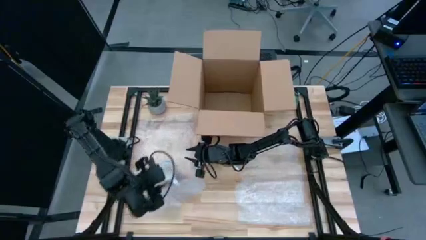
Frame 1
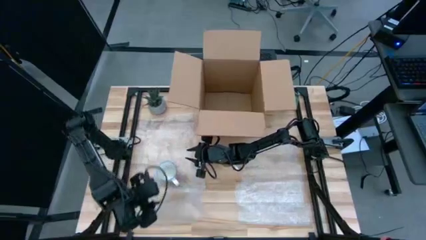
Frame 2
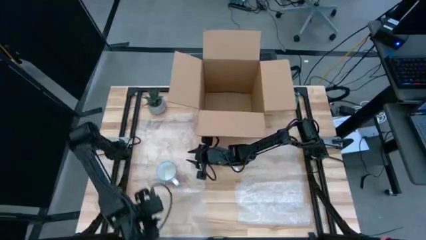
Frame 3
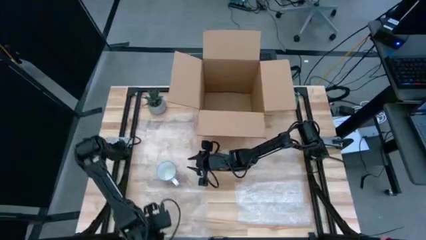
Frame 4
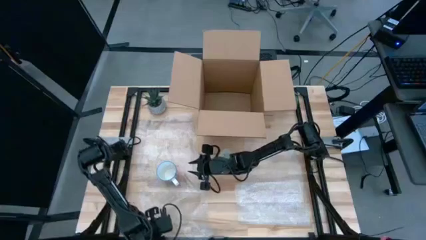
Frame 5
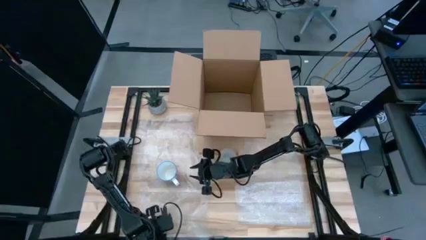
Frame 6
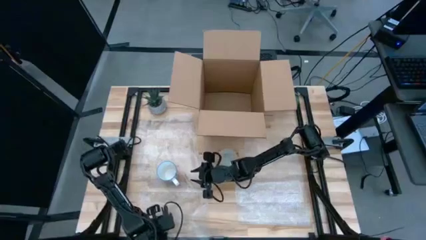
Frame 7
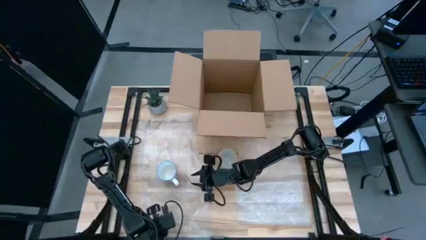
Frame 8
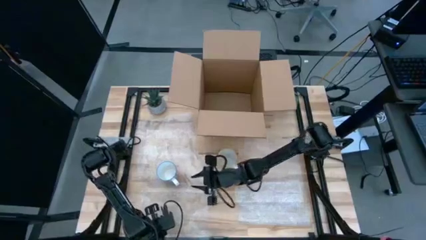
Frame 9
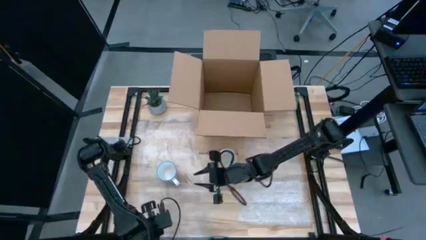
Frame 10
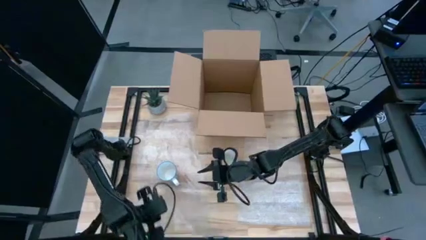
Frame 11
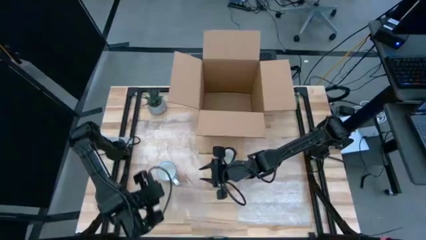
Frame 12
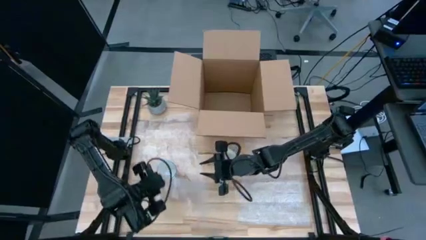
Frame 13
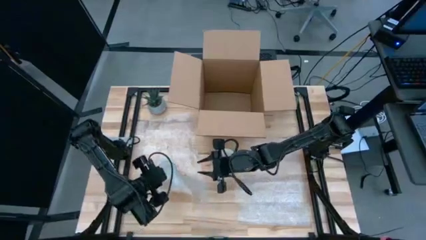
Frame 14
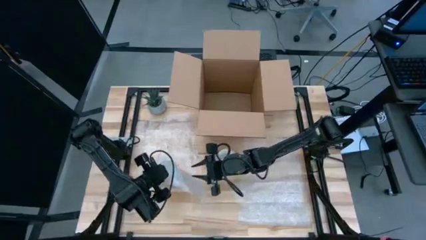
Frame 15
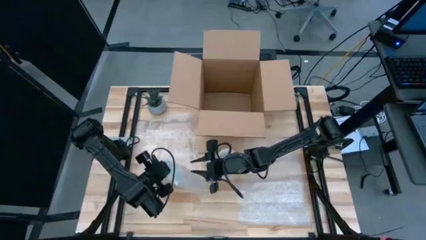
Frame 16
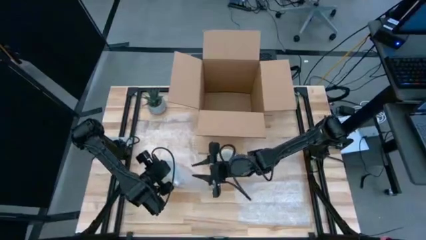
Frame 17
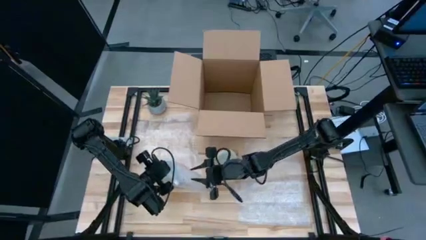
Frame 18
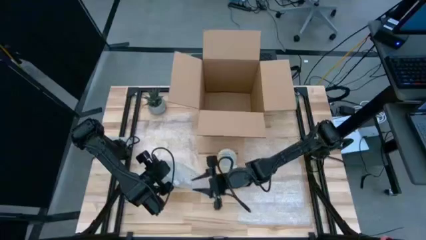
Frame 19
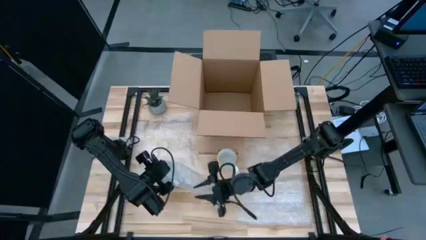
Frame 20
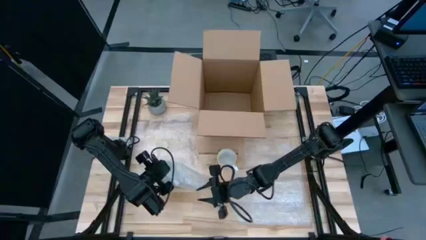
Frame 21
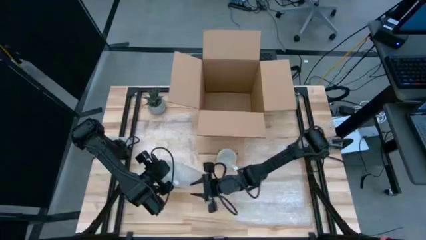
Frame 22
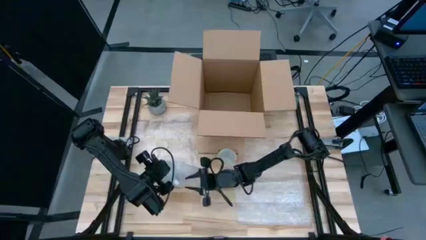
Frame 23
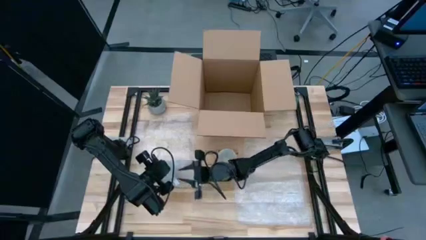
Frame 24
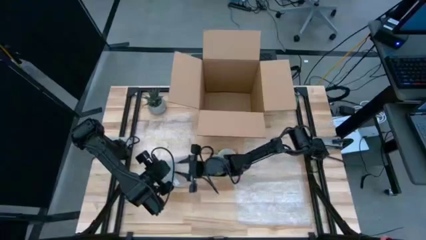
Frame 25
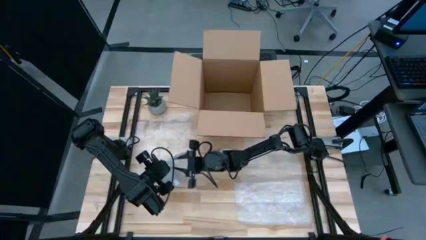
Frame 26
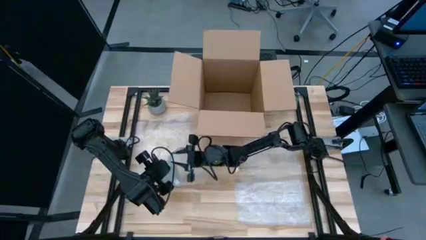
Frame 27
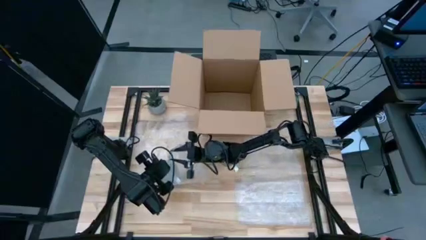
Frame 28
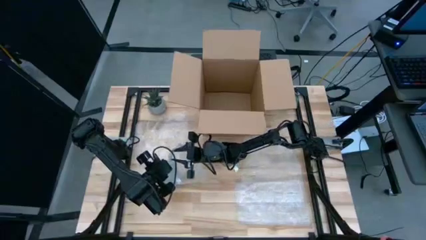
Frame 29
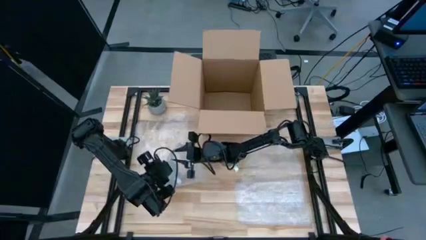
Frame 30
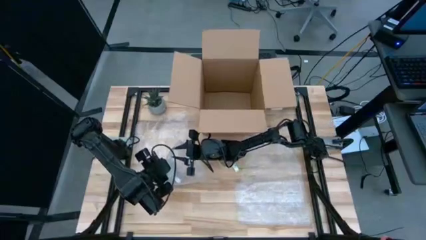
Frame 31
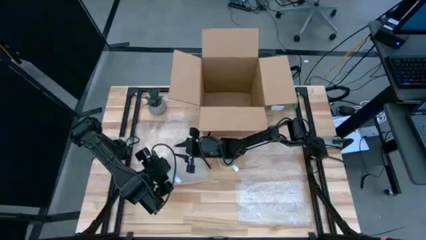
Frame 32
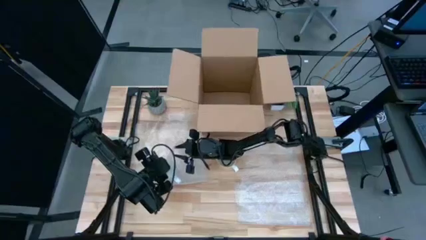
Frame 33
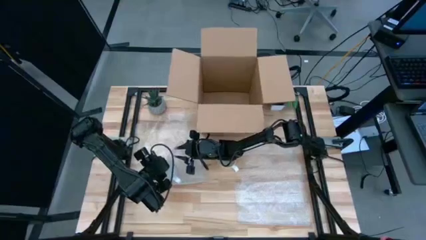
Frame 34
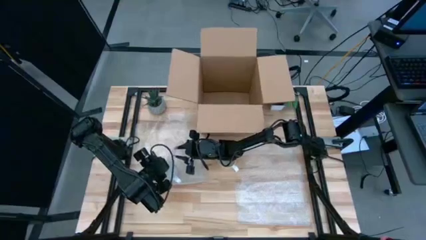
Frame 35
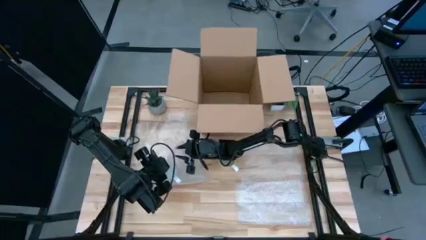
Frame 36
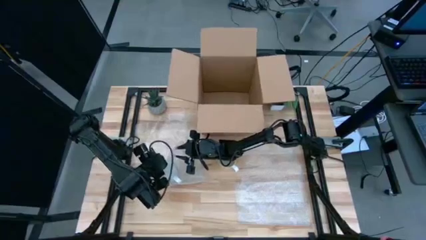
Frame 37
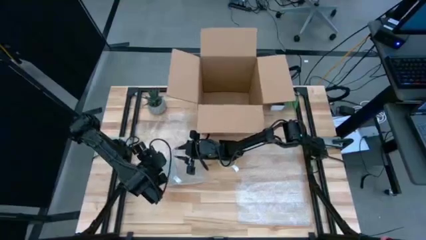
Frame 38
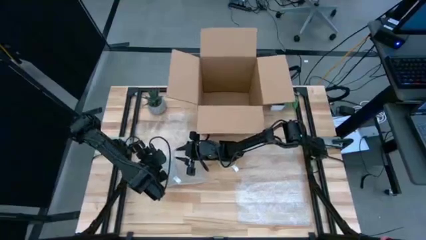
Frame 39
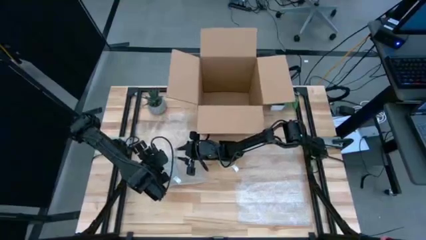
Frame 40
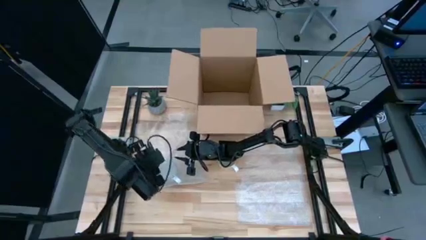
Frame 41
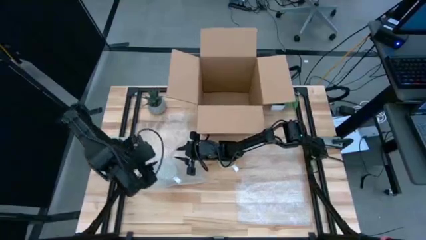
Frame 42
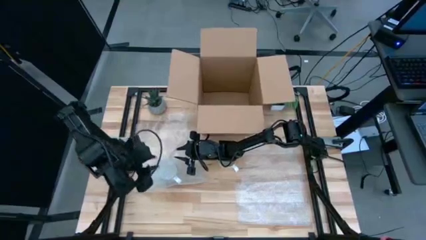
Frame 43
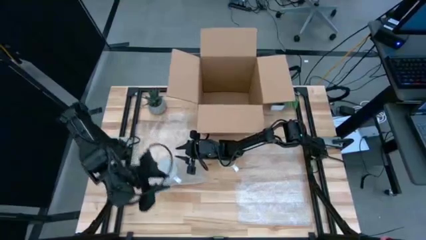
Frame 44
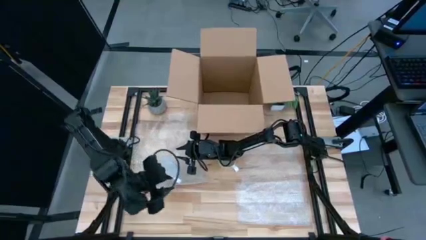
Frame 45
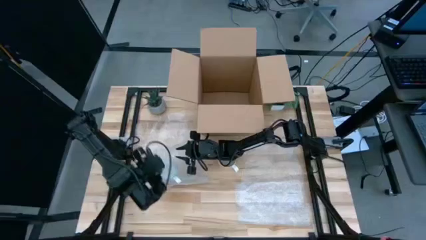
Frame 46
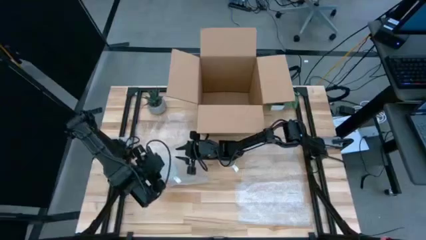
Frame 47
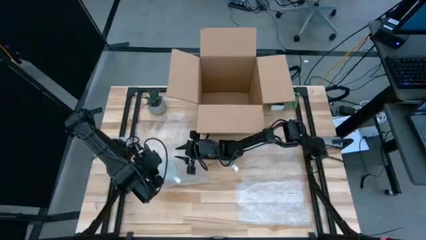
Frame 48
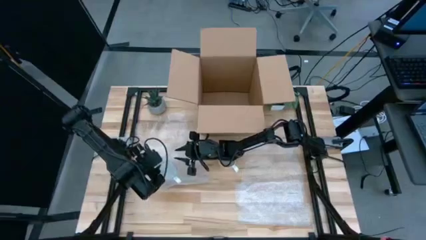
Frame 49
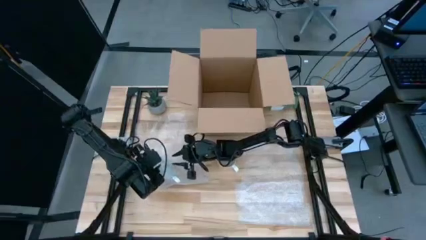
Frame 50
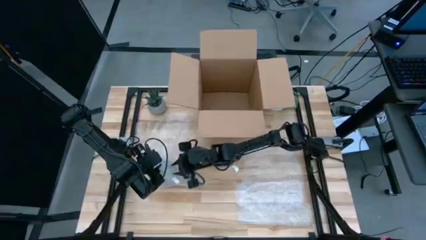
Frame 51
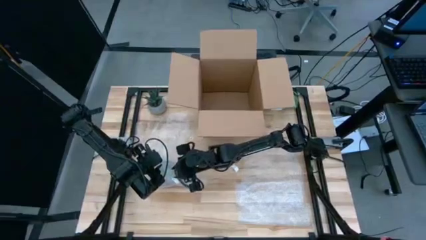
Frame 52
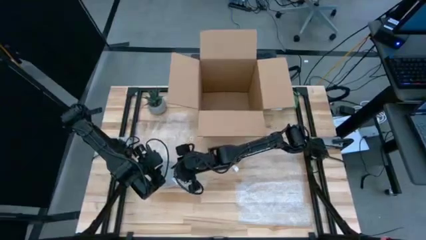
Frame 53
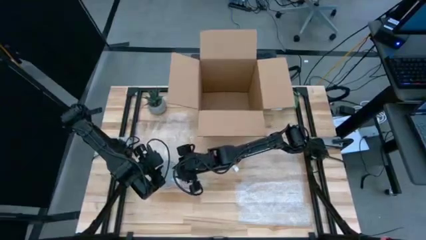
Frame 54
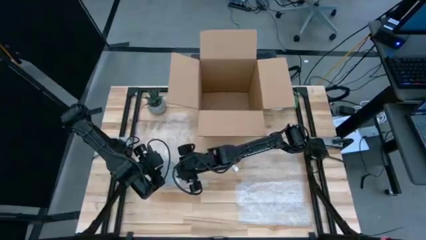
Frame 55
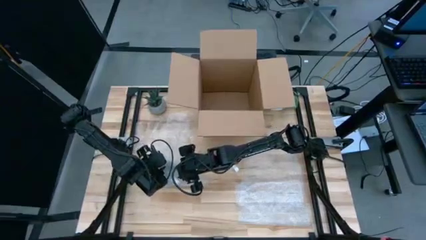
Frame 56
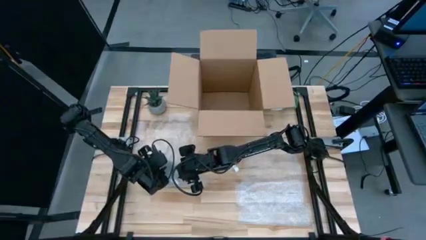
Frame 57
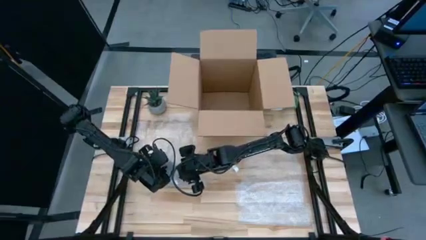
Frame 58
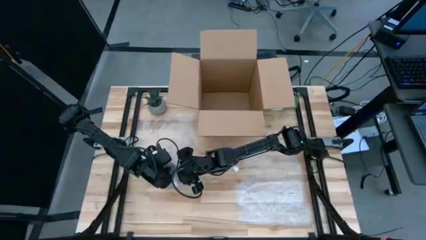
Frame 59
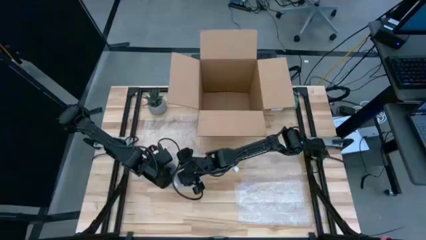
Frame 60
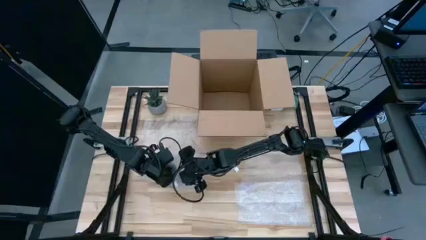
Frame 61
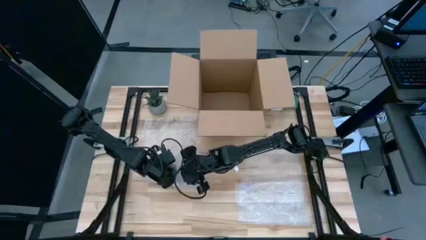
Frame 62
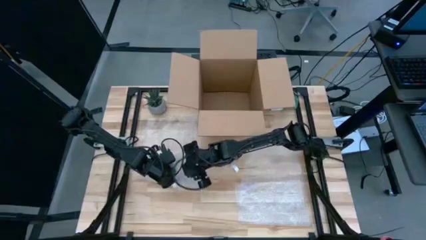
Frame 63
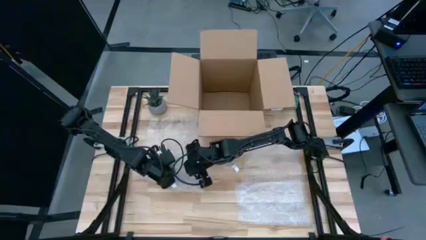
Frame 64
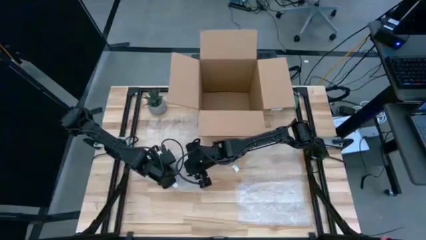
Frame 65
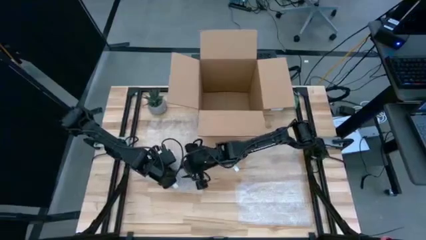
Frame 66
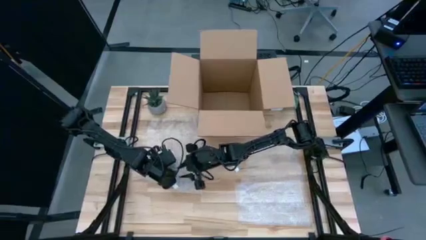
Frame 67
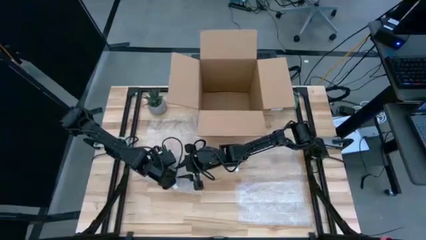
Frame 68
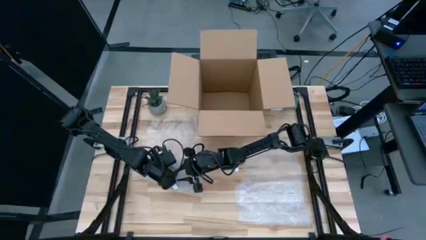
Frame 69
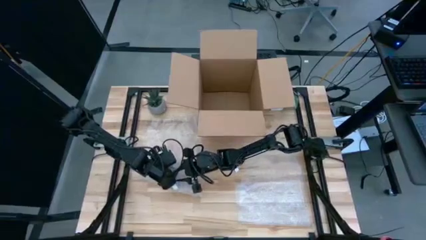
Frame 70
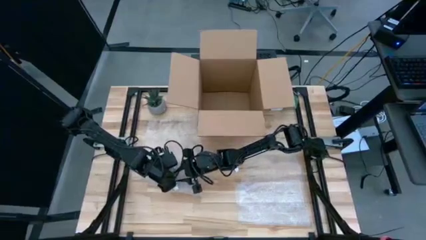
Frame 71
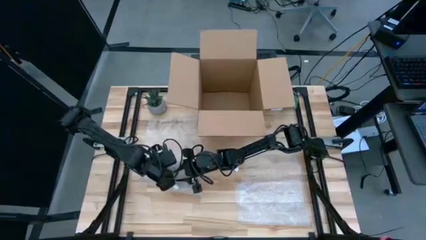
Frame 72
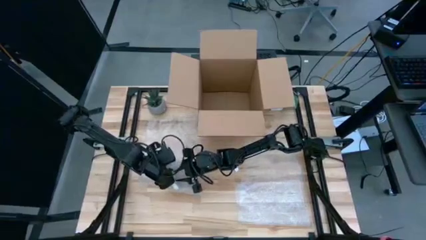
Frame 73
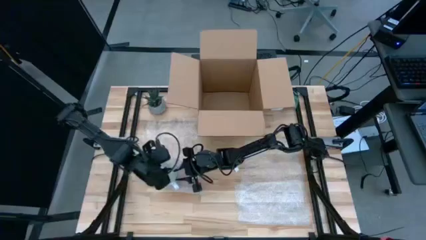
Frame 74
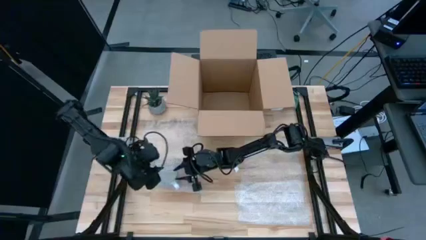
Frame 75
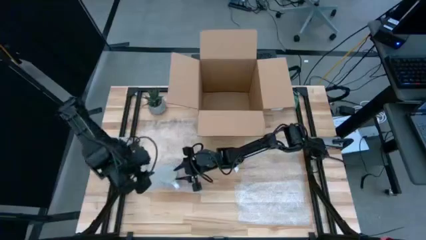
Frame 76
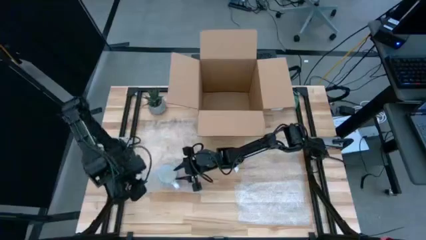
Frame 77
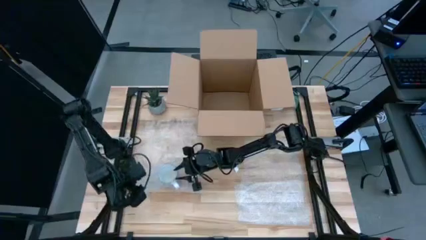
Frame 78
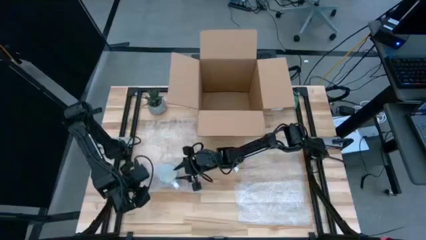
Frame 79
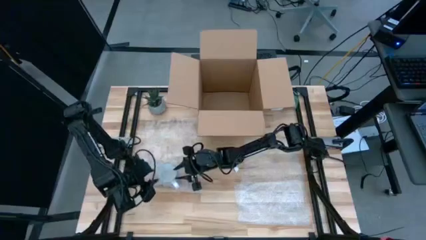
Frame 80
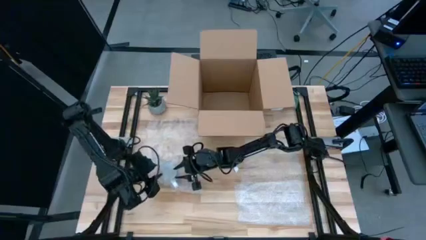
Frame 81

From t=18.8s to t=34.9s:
Task: wrap mug
Wrap the red mug with the bubble wrap
